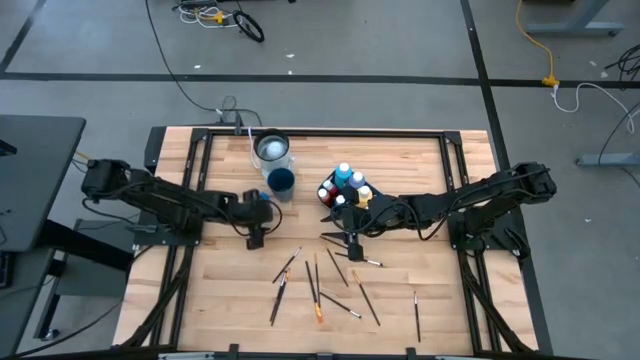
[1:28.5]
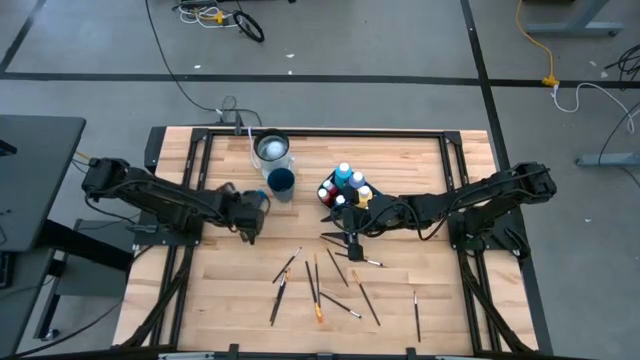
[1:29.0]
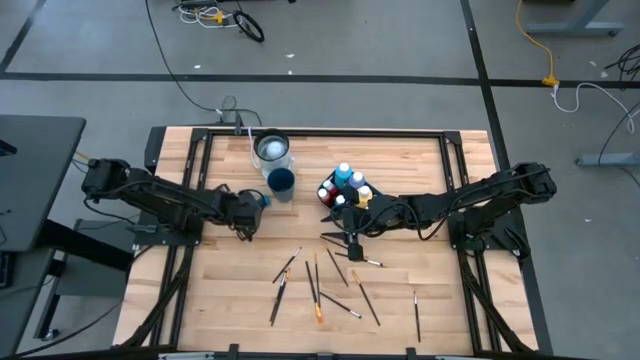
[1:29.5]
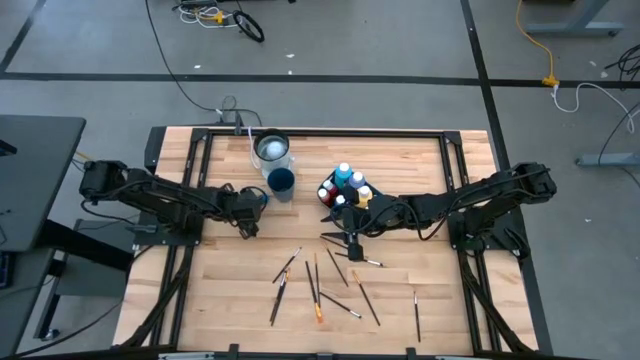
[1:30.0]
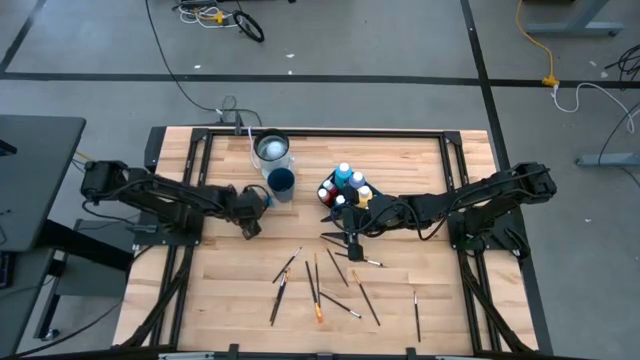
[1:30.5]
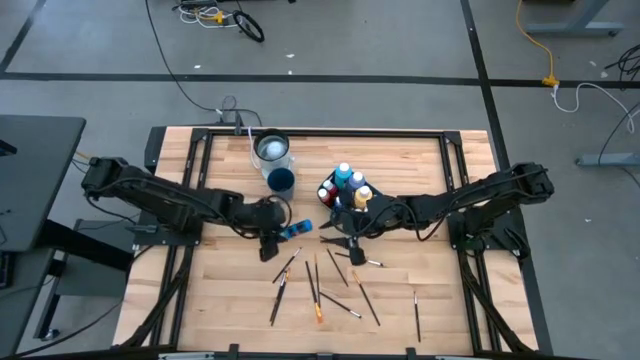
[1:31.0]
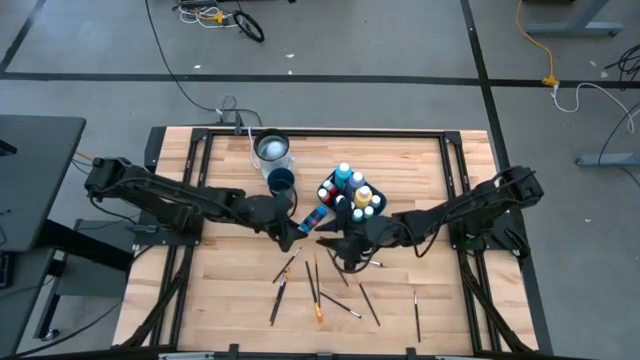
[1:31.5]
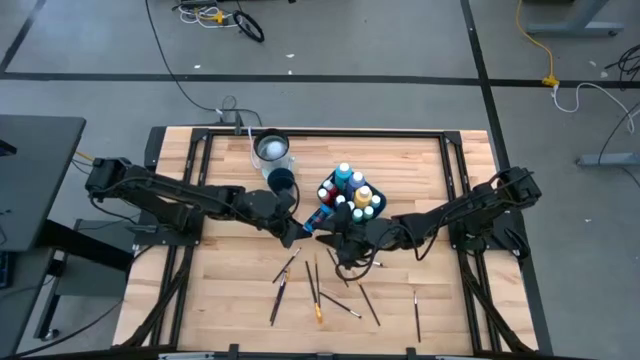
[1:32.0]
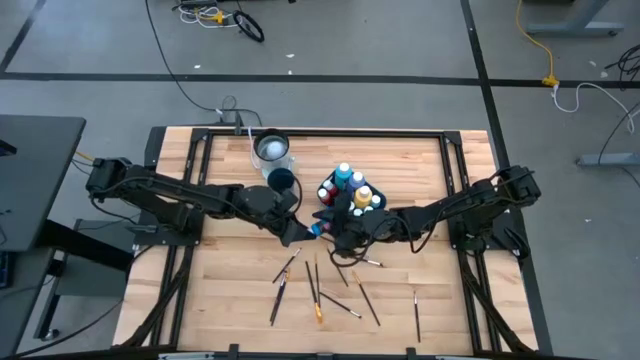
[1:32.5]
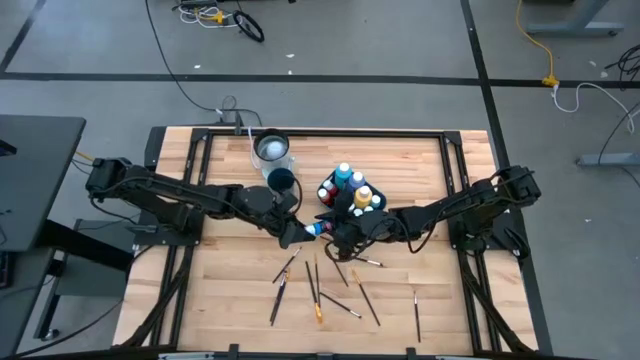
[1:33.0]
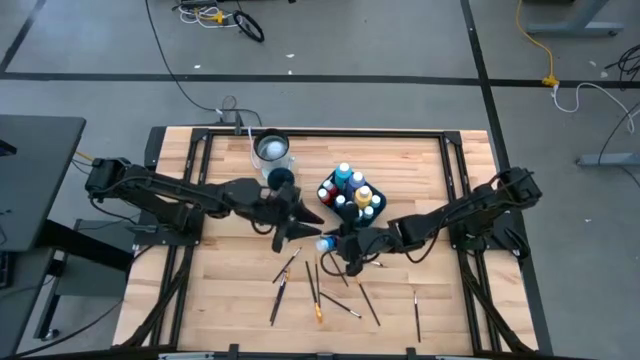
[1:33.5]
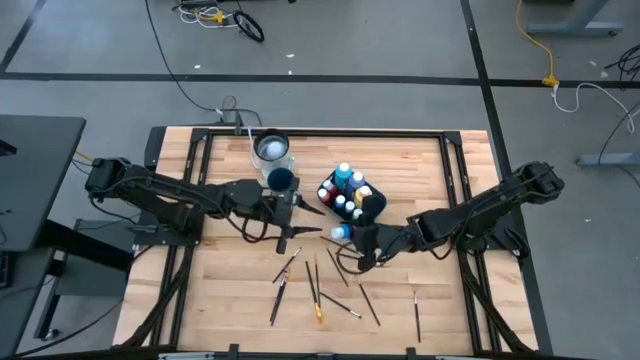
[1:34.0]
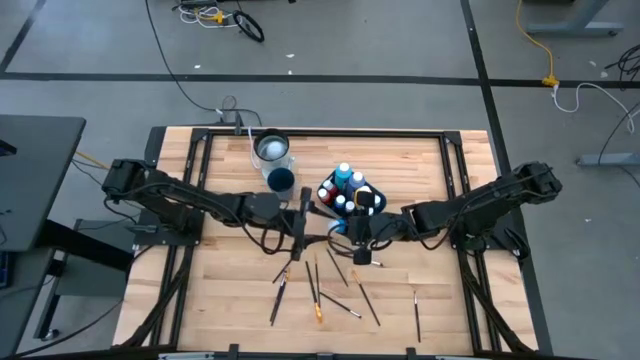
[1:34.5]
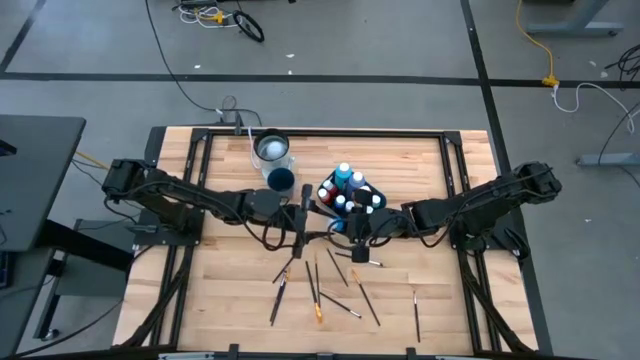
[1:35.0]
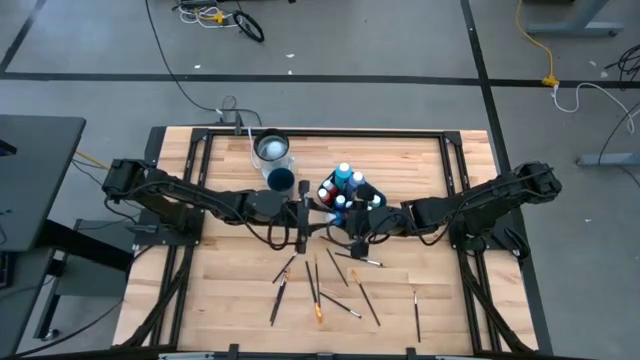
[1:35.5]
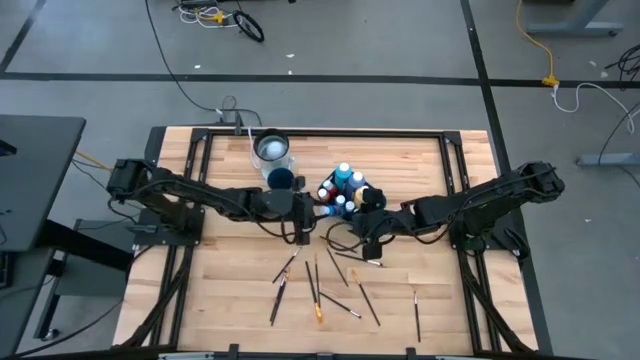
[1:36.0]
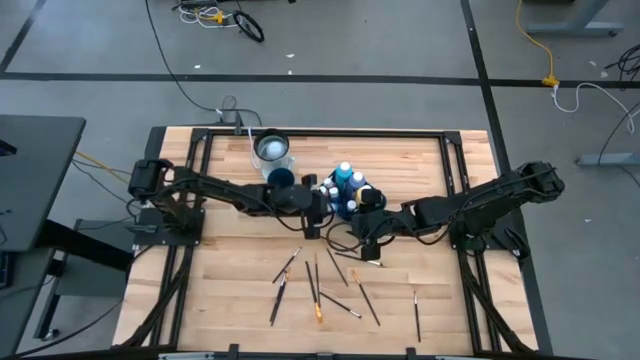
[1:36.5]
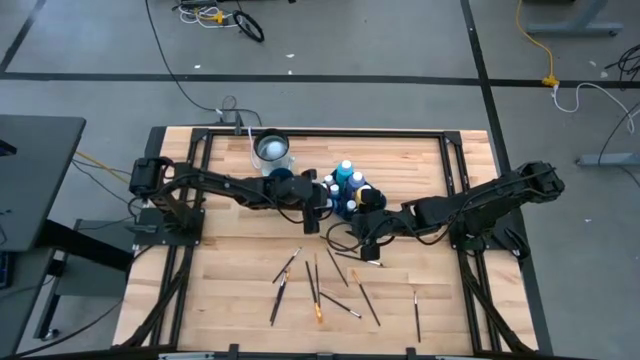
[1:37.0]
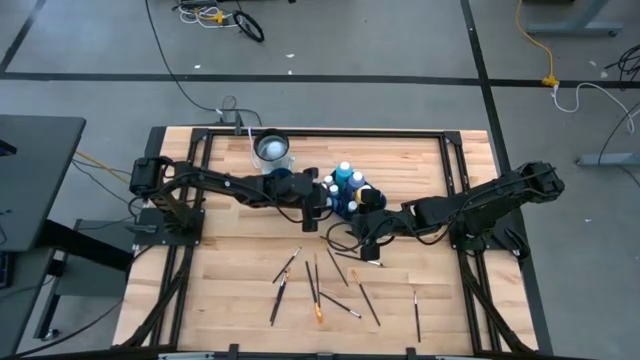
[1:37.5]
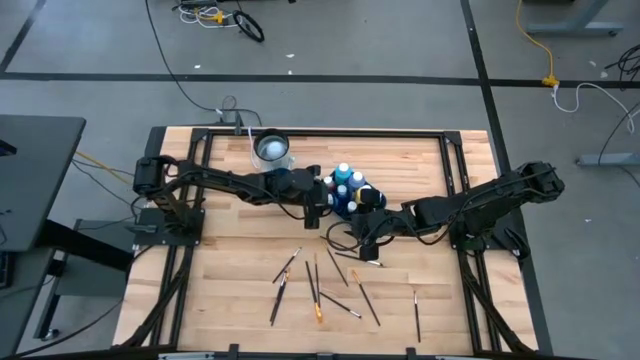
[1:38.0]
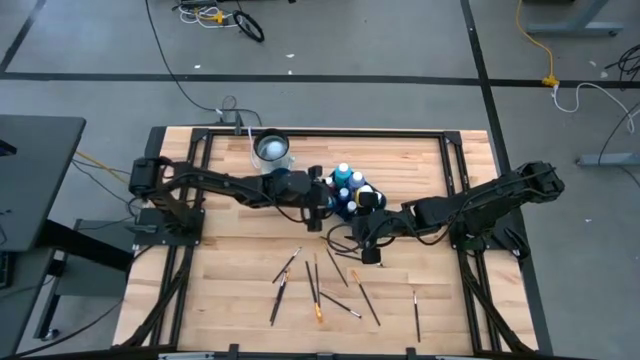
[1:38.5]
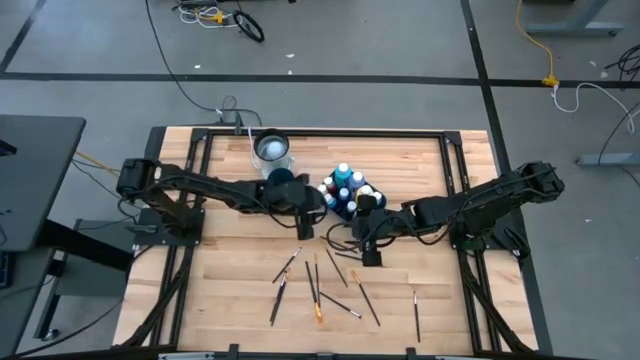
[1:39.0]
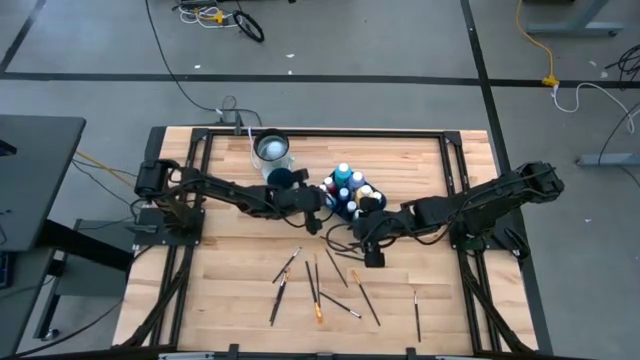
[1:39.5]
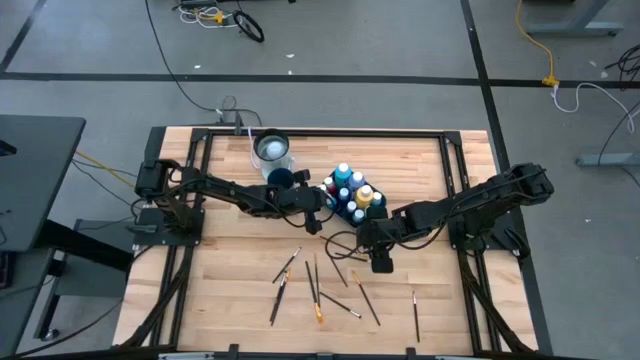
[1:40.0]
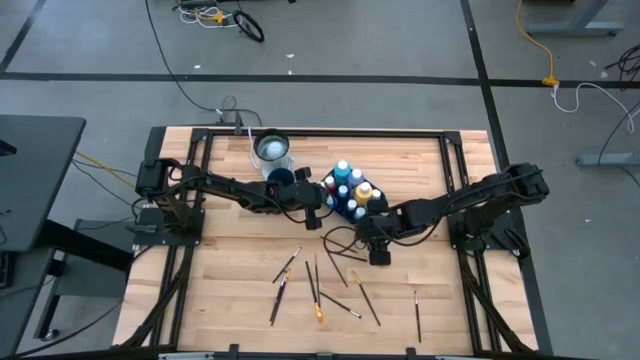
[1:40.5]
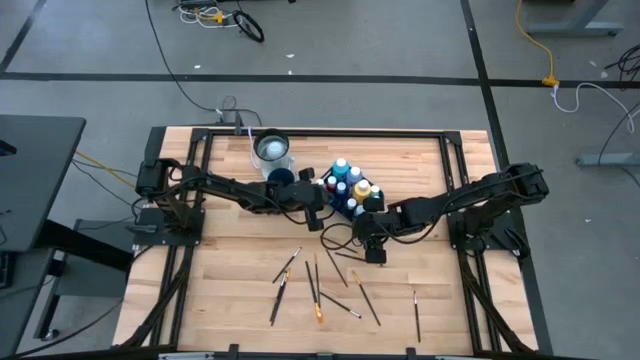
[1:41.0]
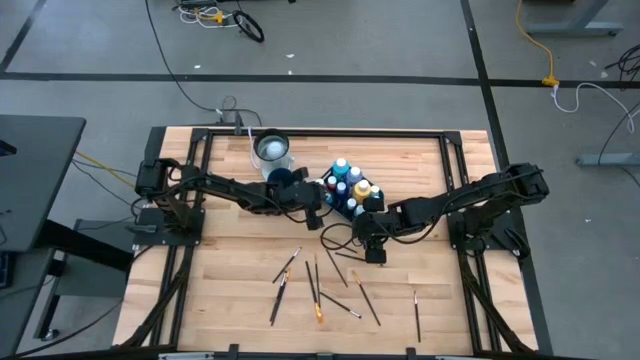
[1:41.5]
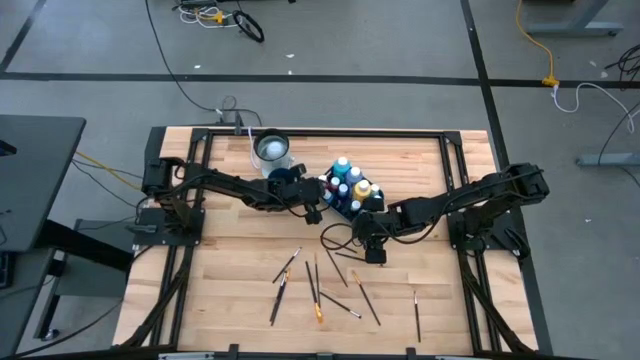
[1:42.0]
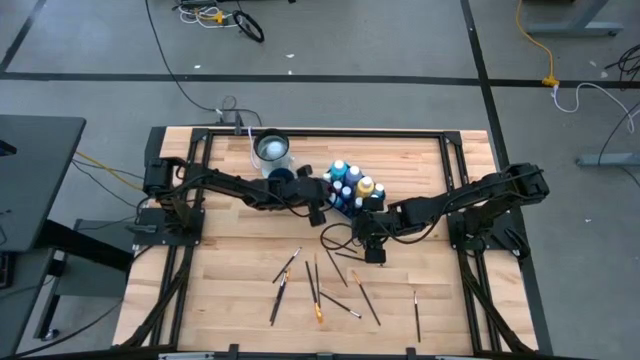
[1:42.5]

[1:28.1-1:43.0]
Task: Pick & Place Paint Supplies
Put the blue paint bottle into the blue bin

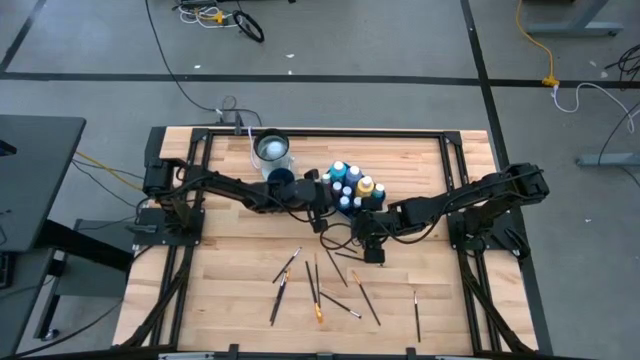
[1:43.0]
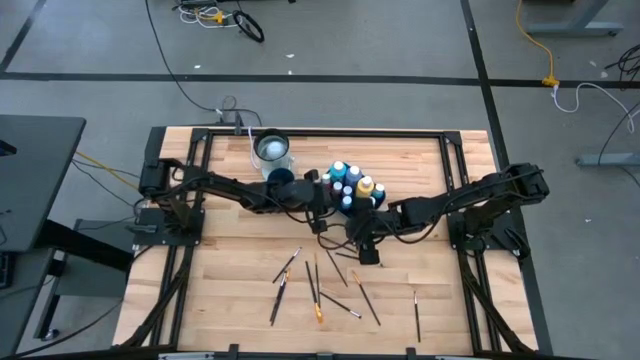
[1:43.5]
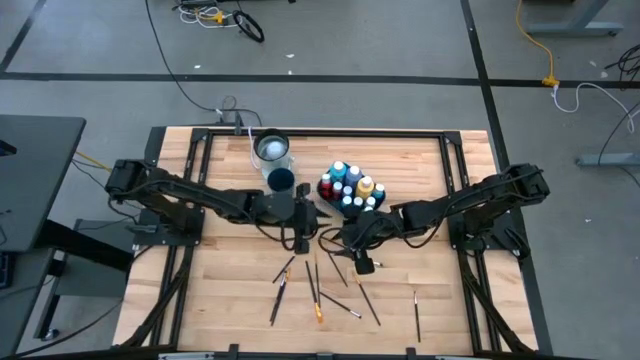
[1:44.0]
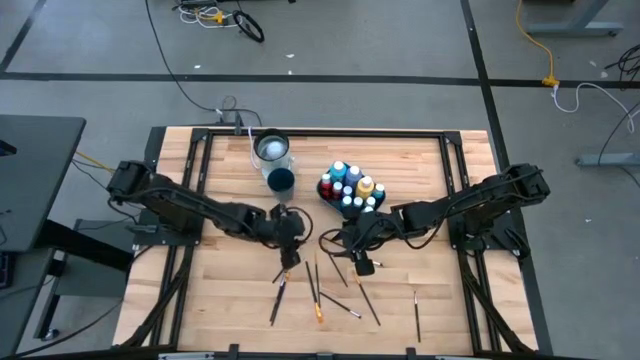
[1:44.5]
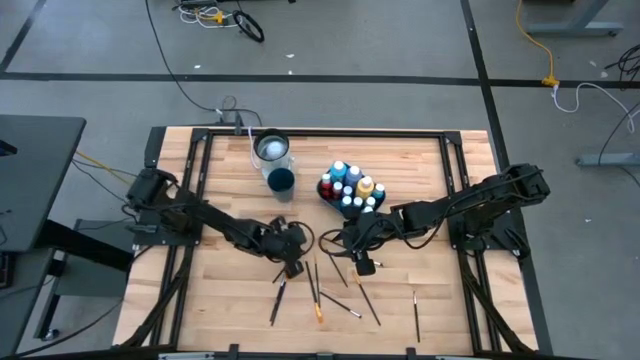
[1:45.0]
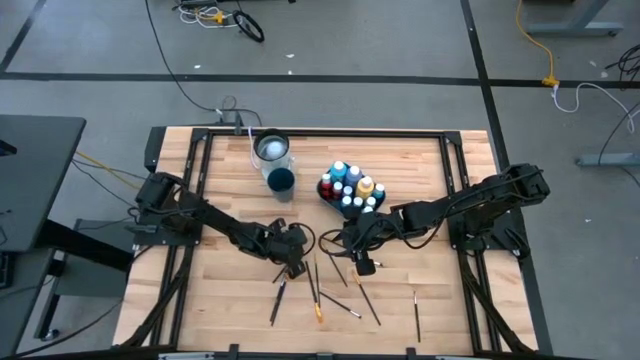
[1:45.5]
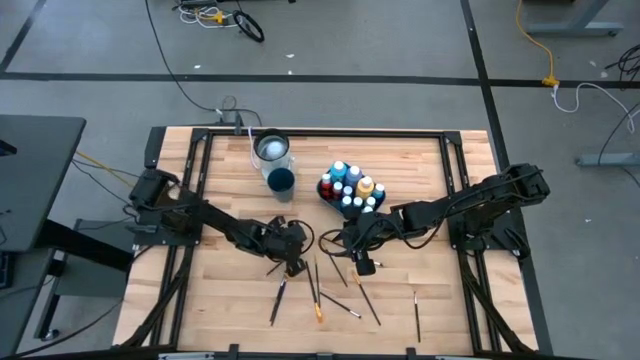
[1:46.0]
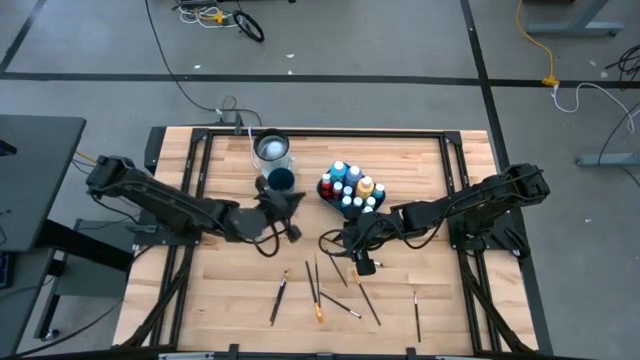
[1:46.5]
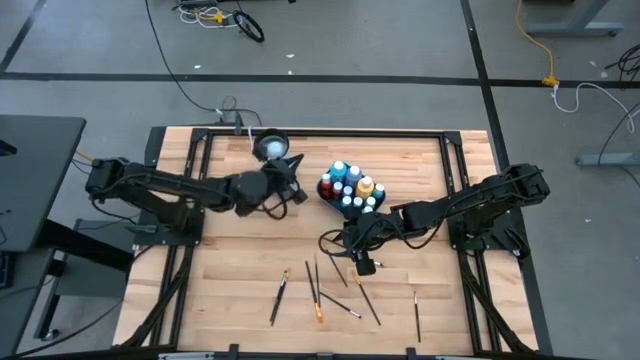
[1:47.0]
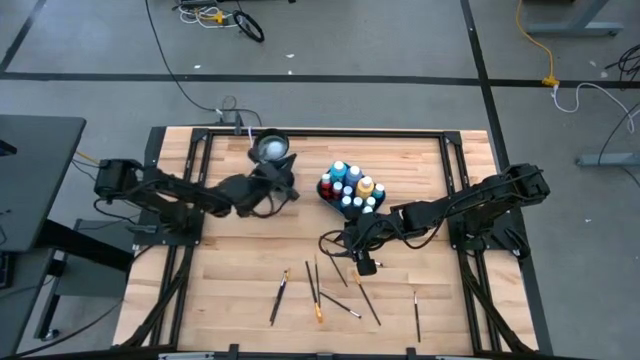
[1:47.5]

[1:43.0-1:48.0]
Put the silver paint brush into the blue cup
